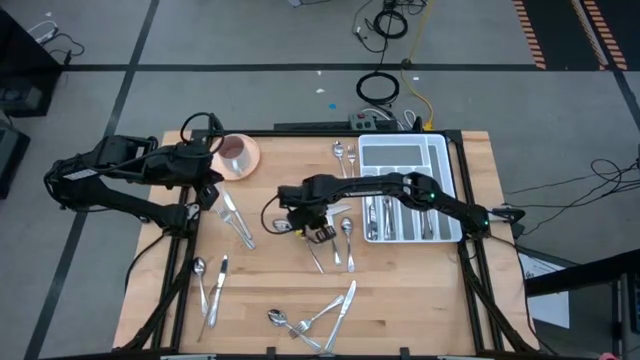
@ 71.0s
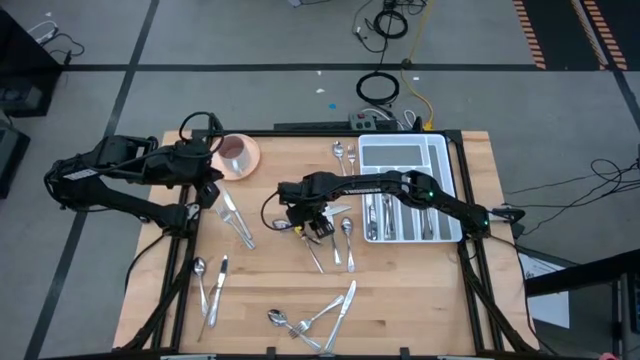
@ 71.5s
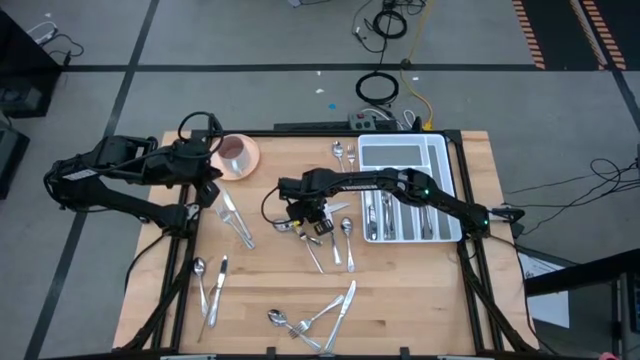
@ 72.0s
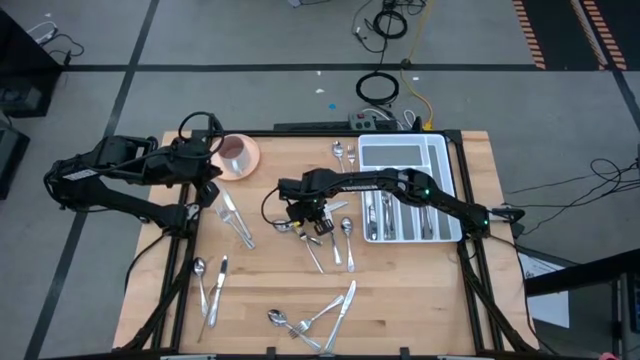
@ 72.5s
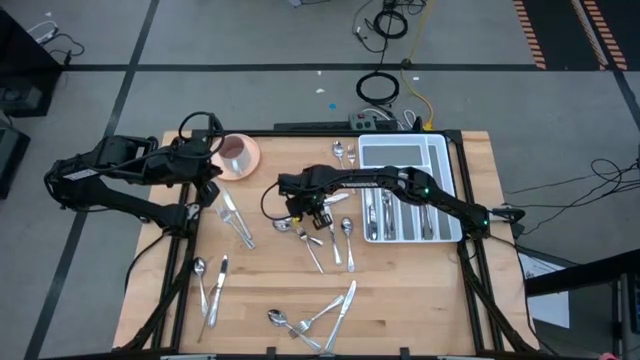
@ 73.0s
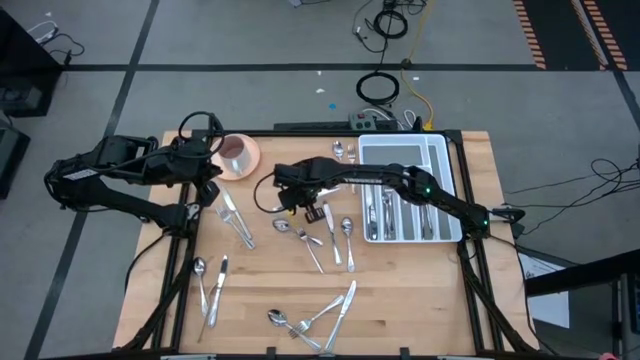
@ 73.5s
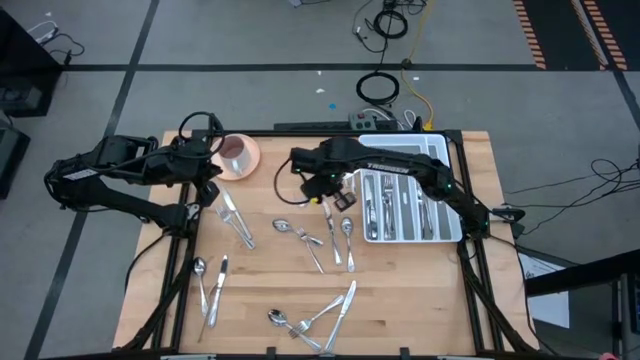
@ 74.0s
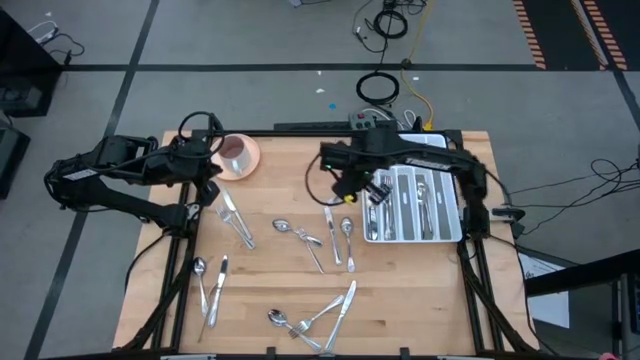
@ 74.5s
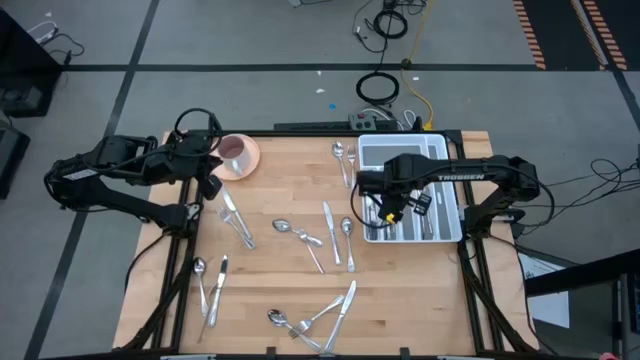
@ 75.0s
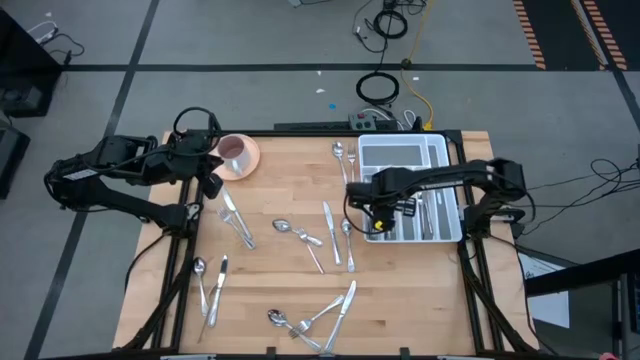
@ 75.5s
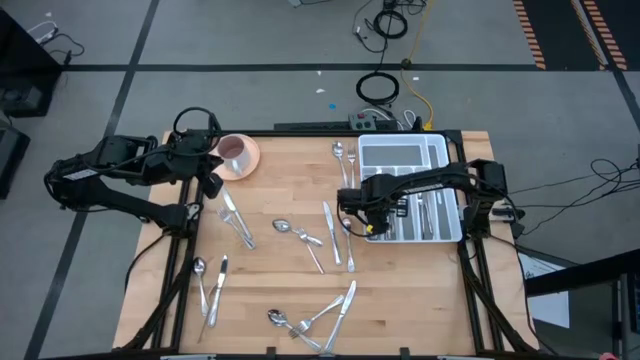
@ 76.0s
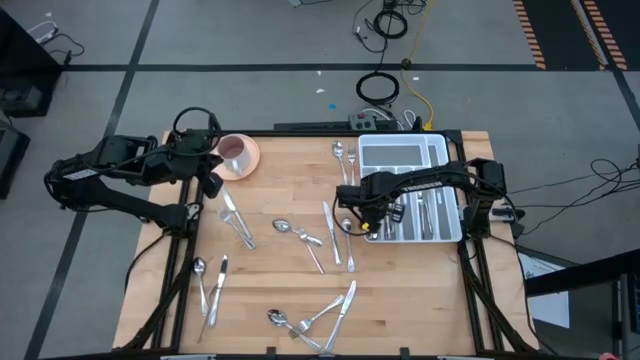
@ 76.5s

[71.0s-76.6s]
Task: Sort silverware
Put the silver table knife into the silverware rack

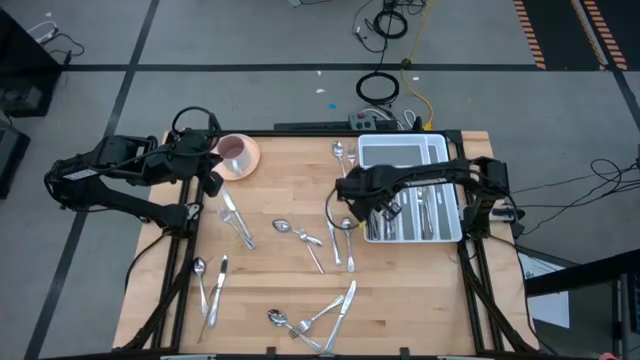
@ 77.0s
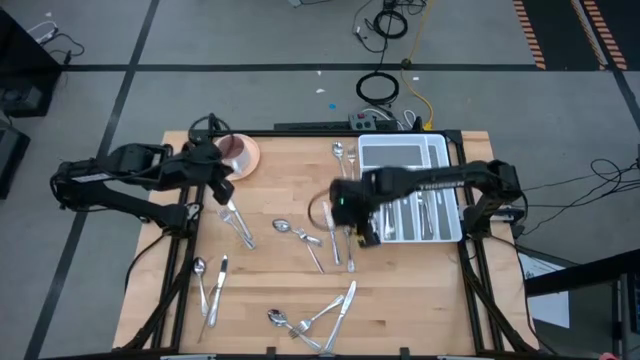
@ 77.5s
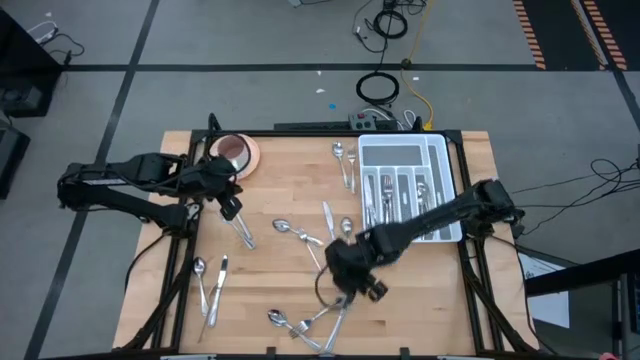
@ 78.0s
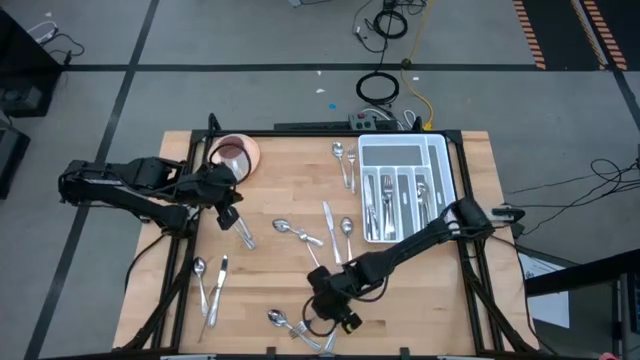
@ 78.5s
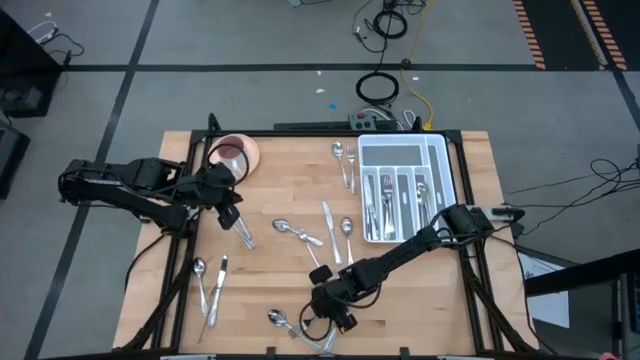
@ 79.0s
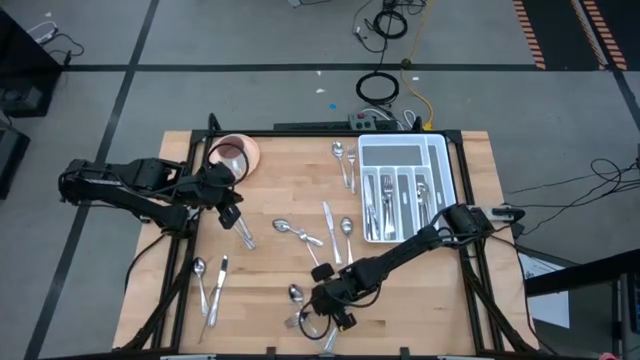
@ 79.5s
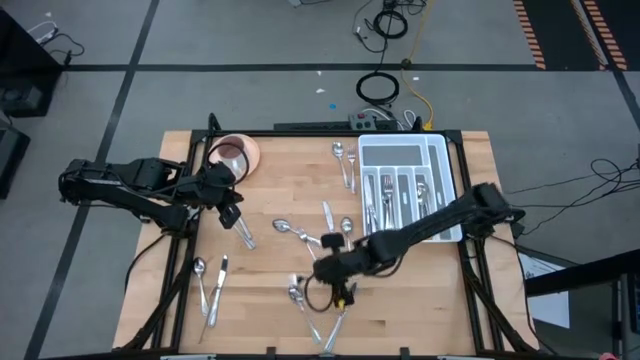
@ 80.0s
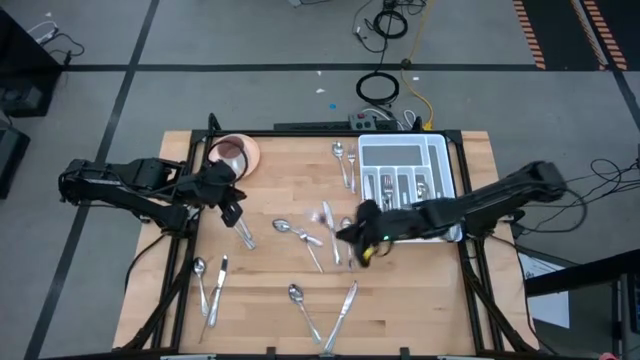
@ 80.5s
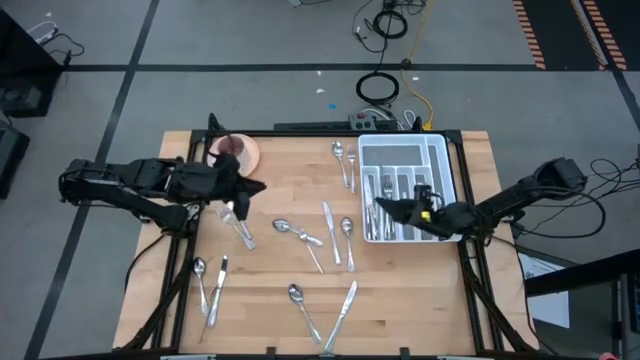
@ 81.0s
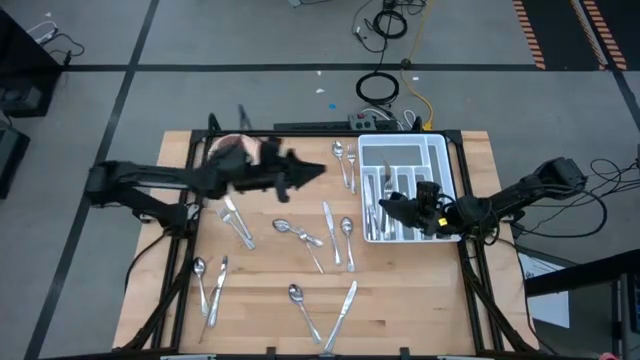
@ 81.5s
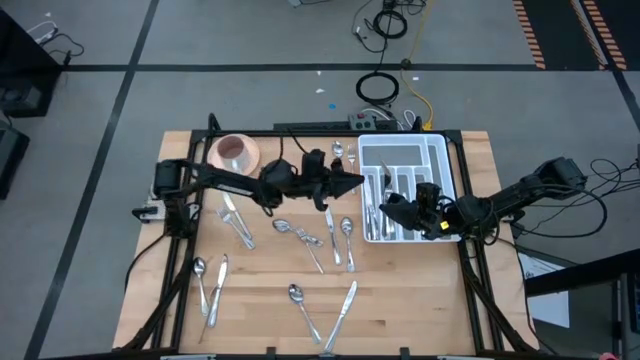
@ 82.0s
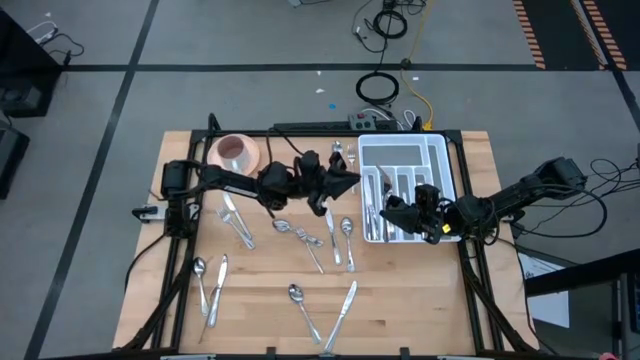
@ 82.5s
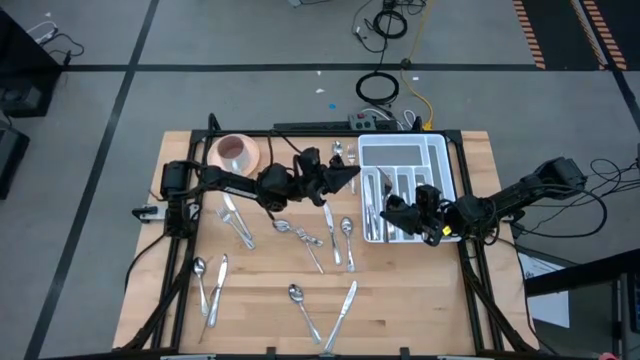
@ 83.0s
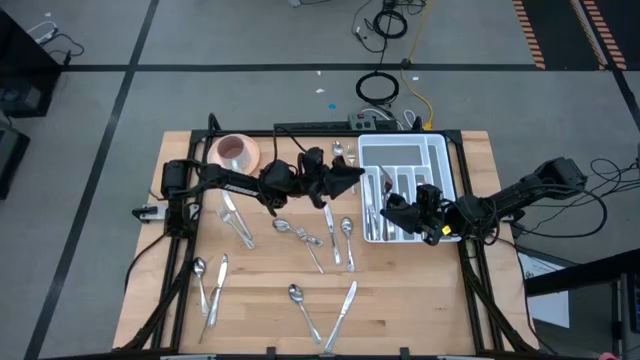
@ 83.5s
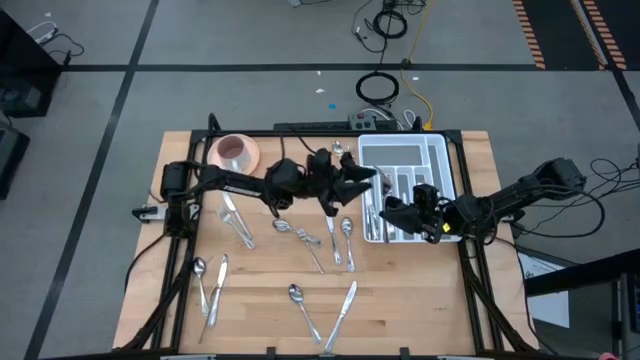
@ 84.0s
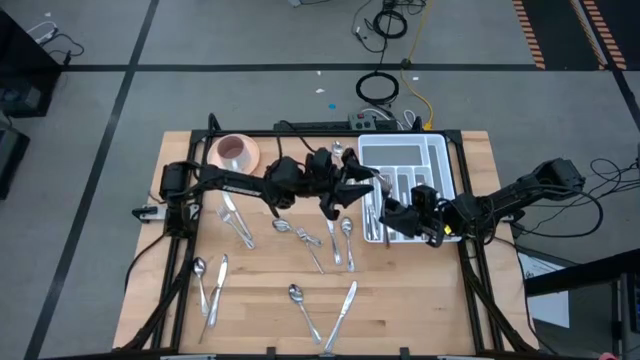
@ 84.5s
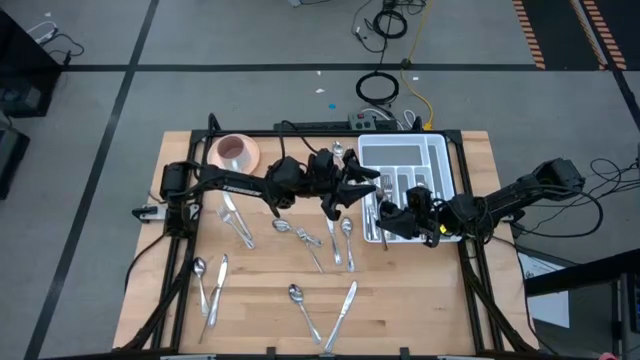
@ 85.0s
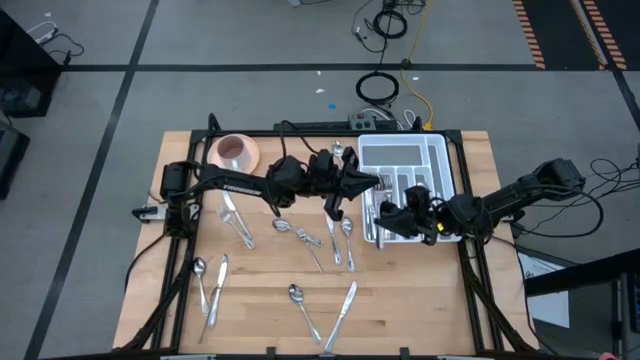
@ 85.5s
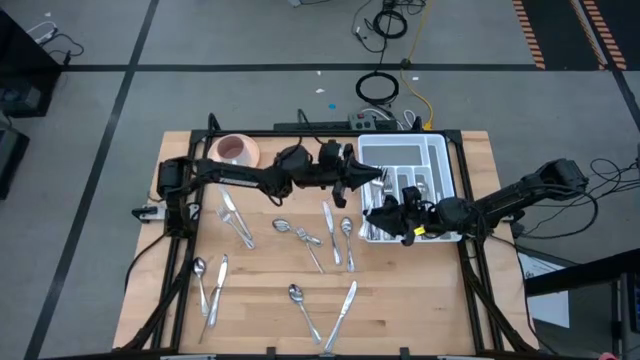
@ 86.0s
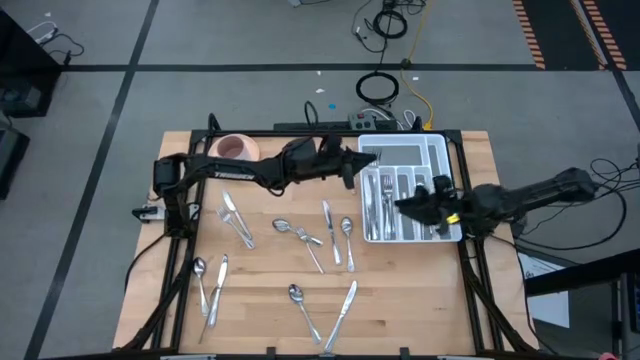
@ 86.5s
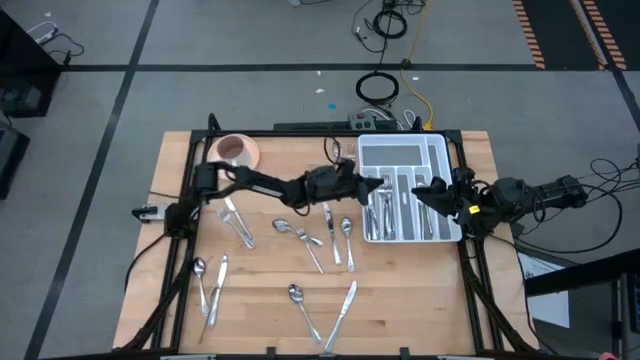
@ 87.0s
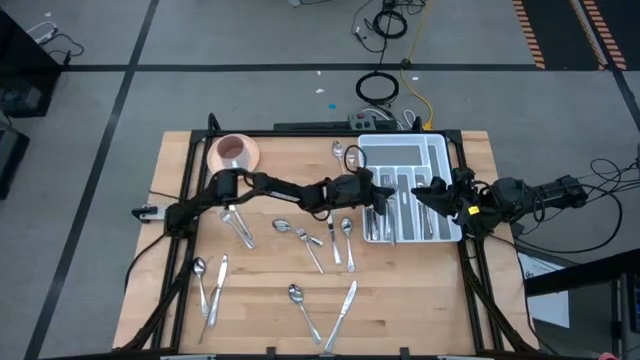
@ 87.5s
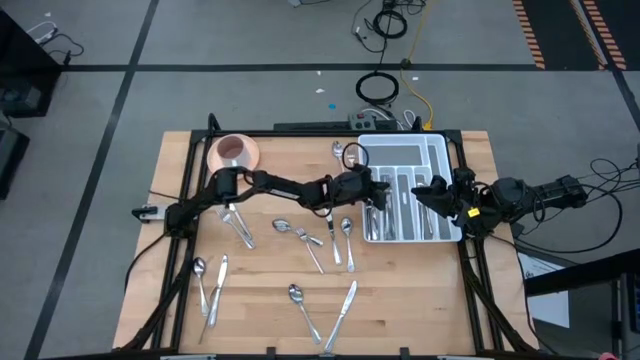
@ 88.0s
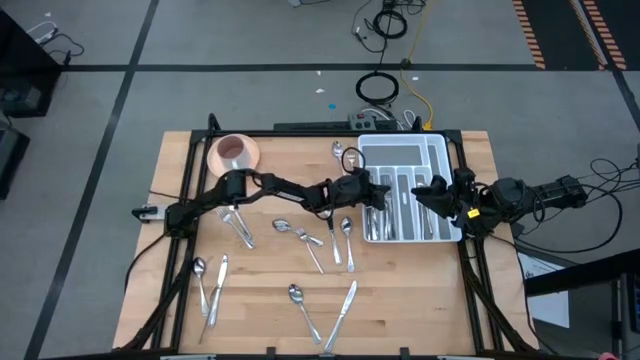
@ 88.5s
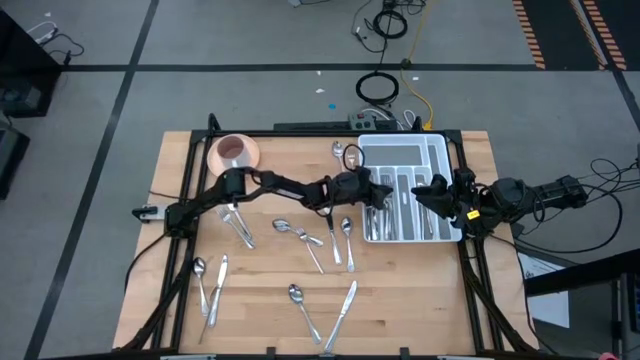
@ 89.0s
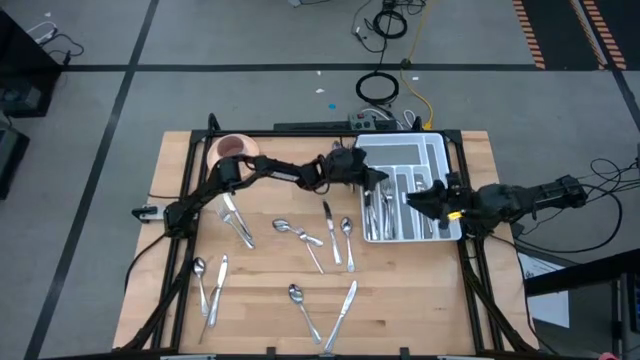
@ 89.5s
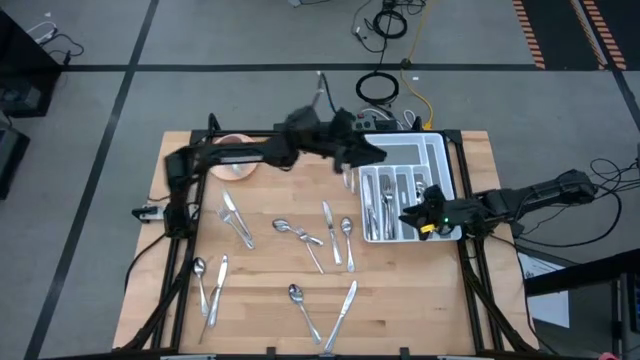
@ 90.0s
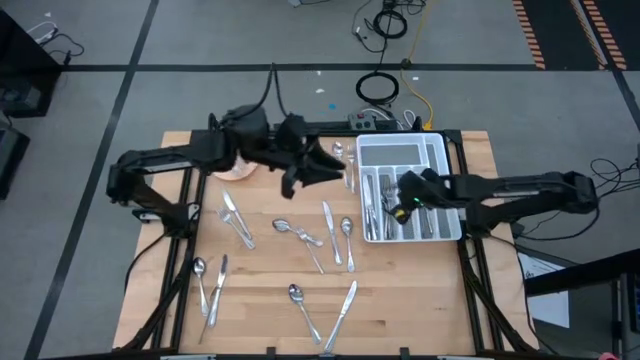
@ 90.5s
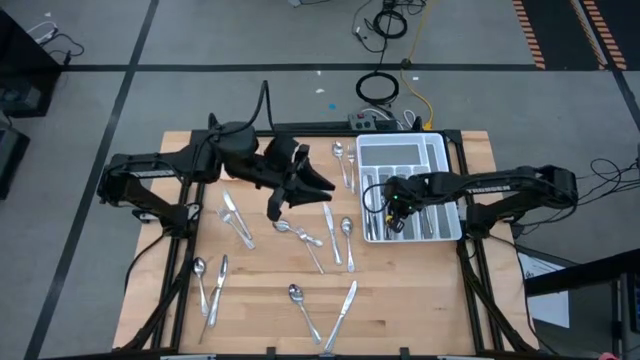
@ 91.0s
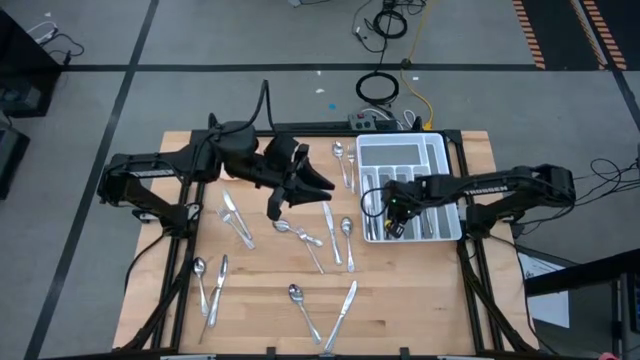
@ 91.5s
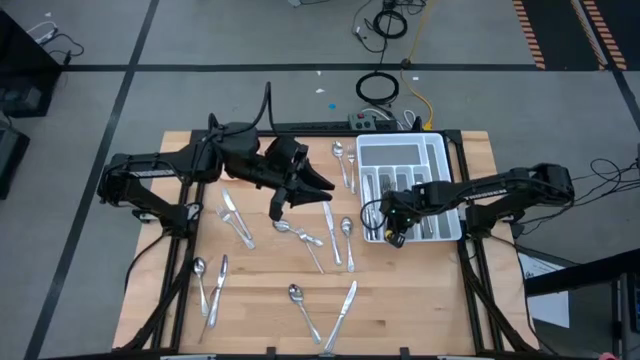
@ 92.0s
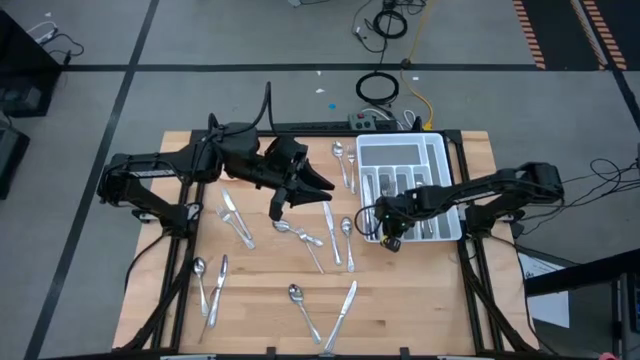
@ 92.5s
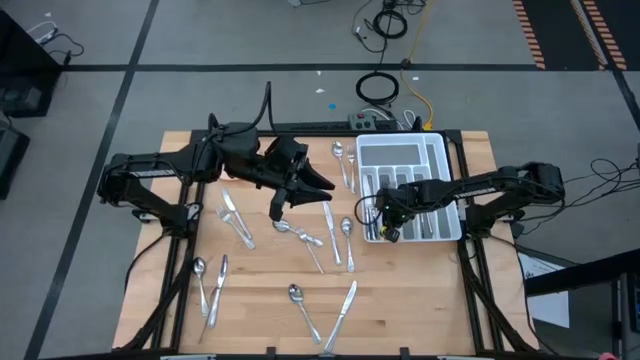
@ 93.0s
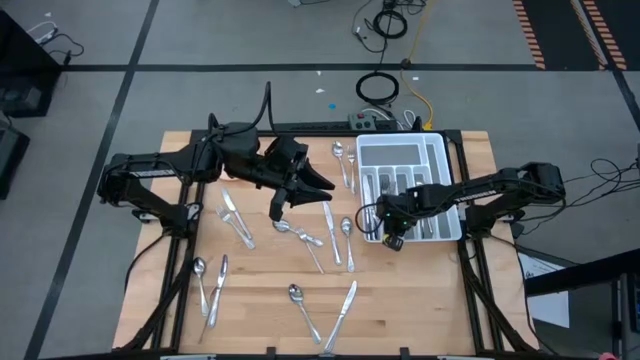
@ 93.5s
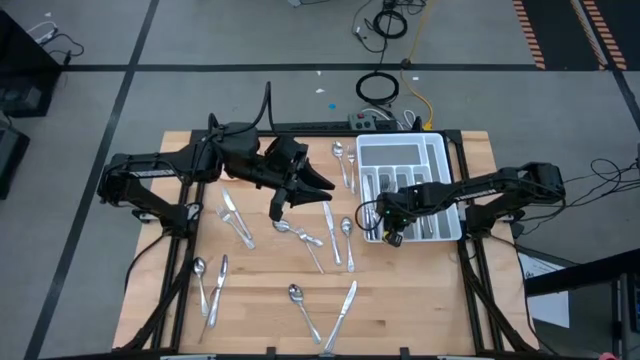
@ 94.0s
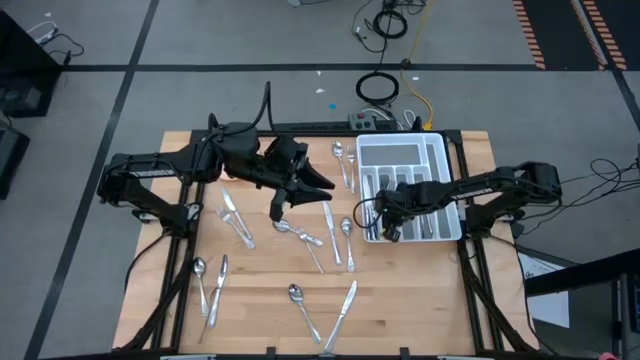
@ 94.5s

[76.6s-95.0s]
Put the silver fork into the silverware rack
